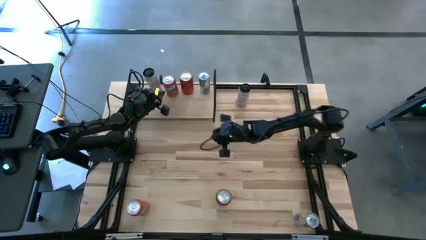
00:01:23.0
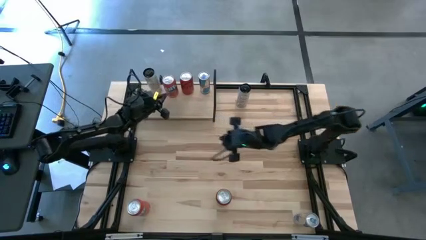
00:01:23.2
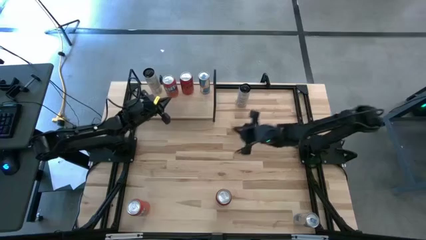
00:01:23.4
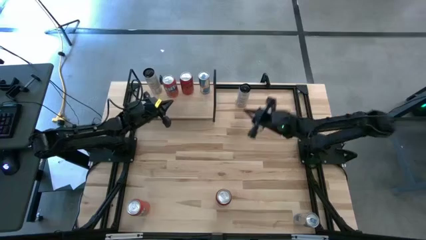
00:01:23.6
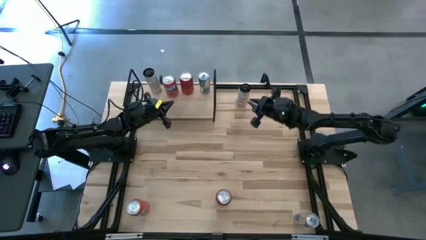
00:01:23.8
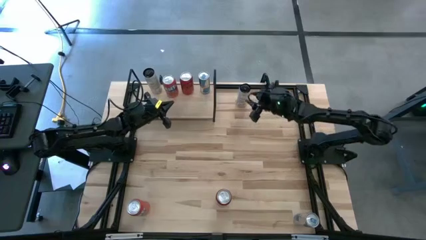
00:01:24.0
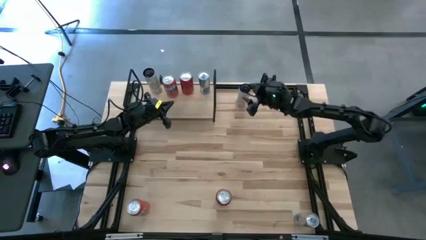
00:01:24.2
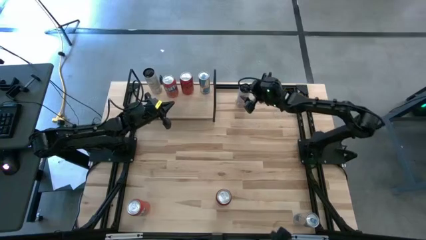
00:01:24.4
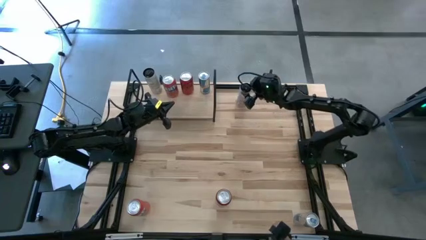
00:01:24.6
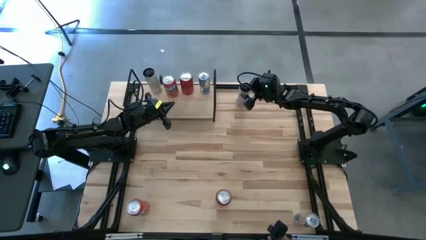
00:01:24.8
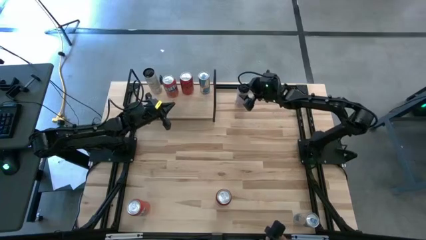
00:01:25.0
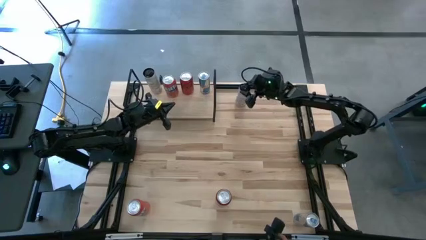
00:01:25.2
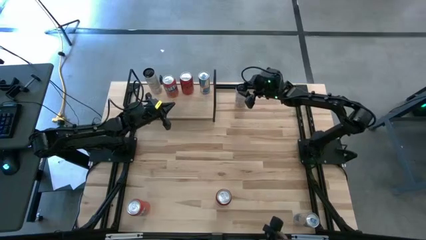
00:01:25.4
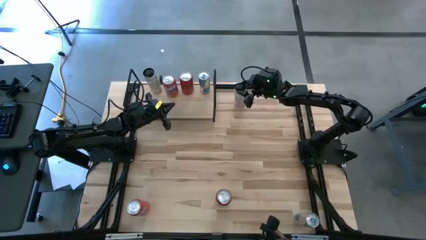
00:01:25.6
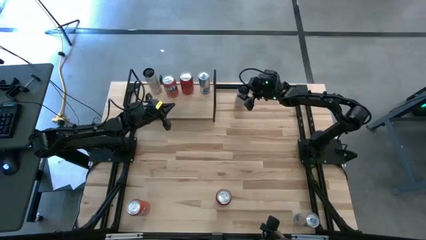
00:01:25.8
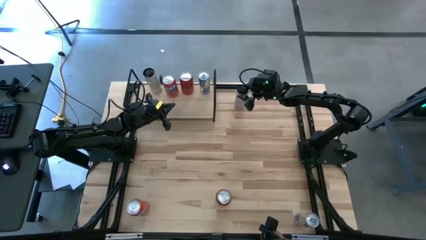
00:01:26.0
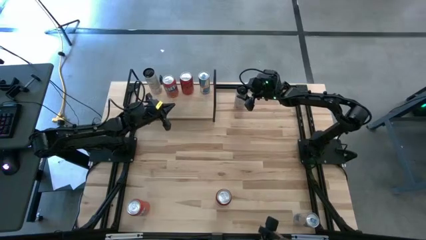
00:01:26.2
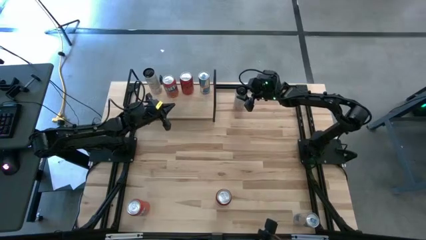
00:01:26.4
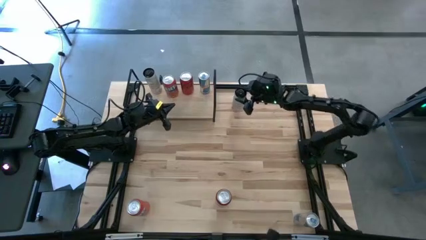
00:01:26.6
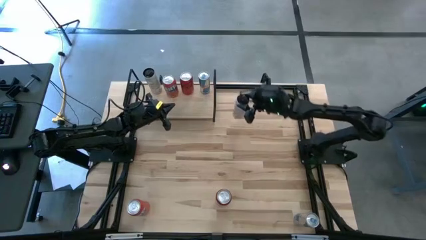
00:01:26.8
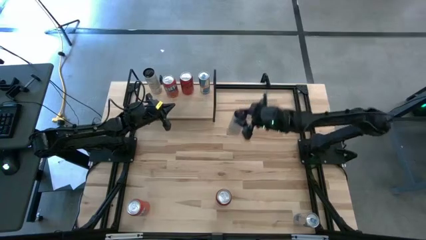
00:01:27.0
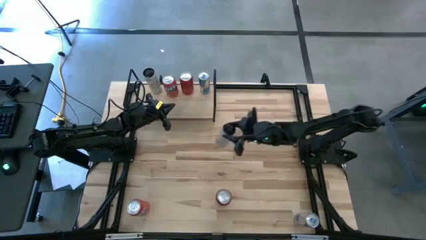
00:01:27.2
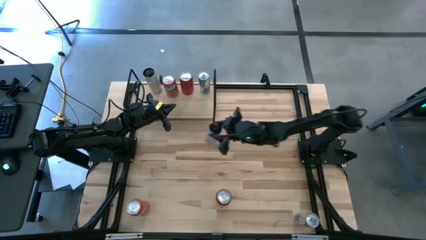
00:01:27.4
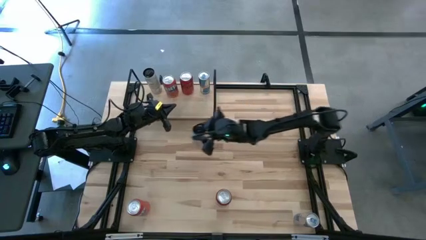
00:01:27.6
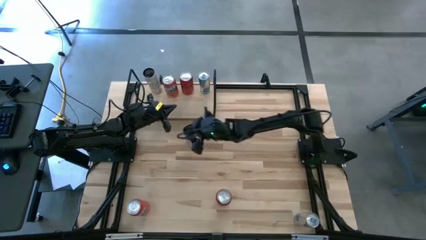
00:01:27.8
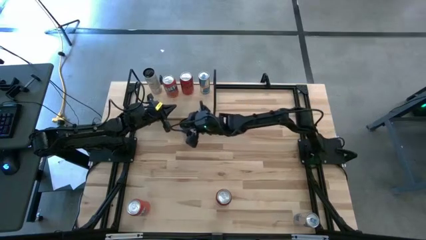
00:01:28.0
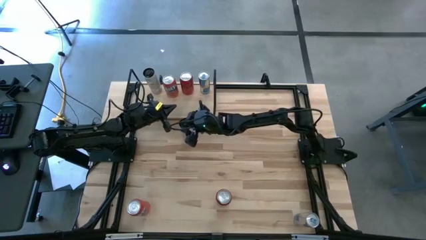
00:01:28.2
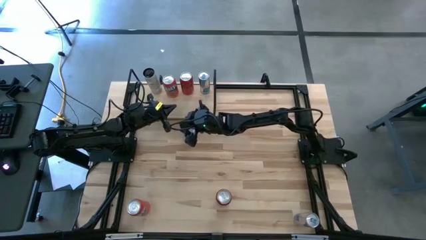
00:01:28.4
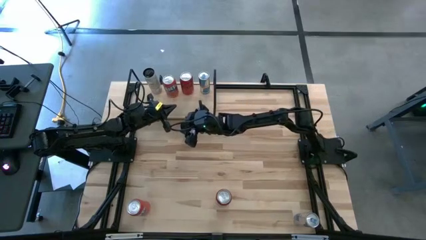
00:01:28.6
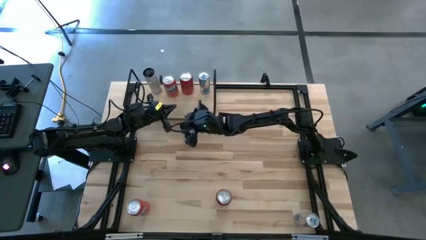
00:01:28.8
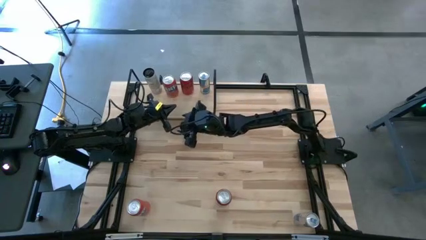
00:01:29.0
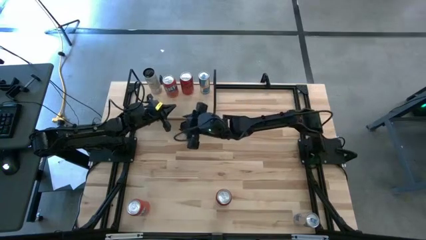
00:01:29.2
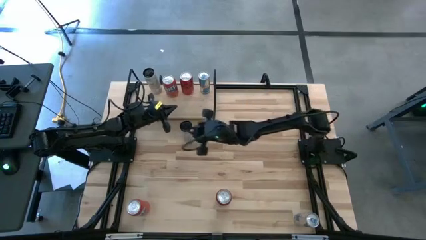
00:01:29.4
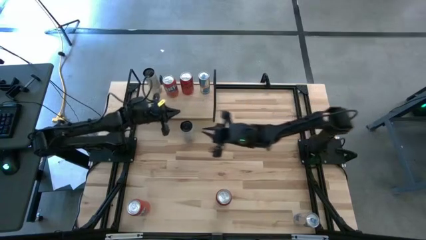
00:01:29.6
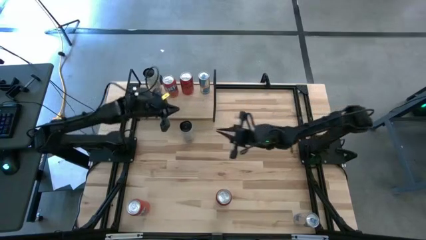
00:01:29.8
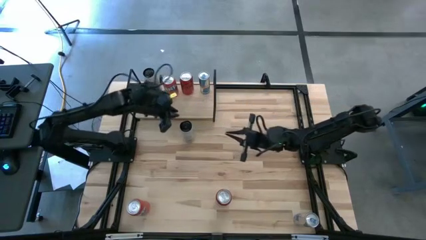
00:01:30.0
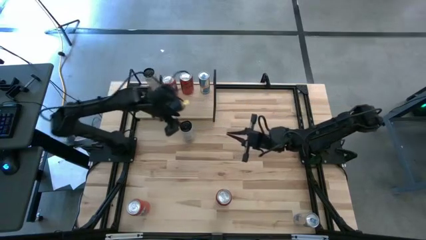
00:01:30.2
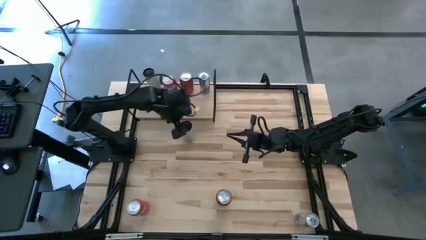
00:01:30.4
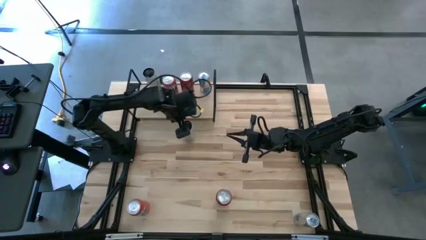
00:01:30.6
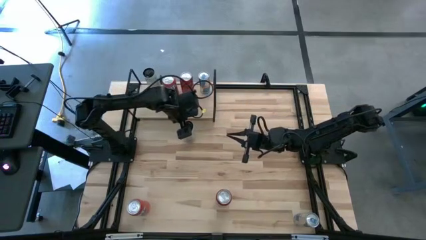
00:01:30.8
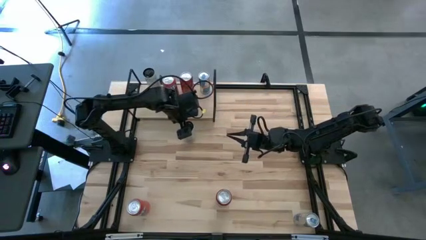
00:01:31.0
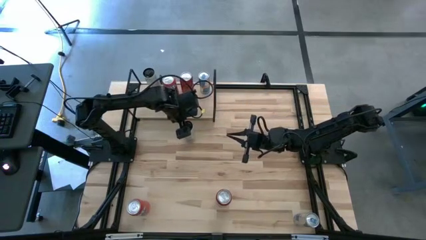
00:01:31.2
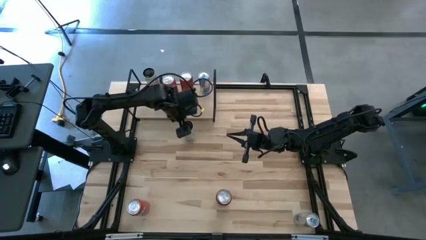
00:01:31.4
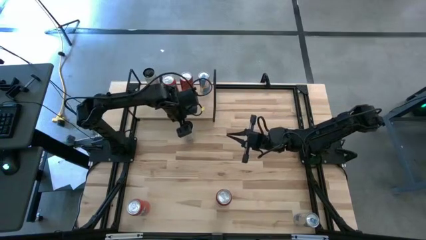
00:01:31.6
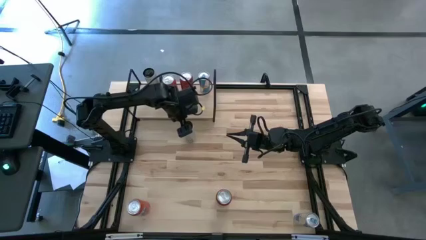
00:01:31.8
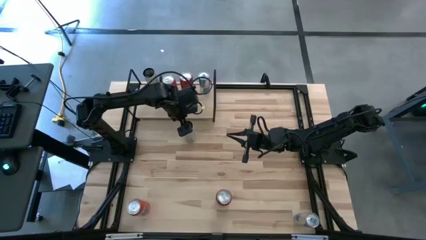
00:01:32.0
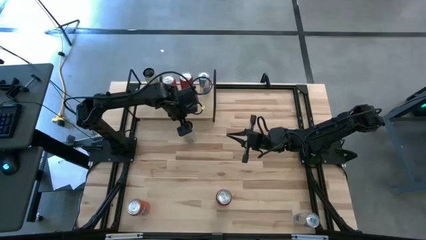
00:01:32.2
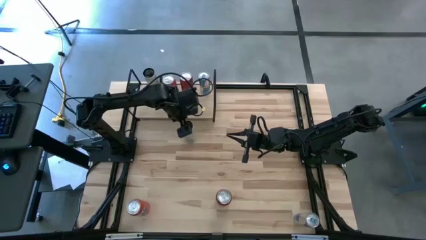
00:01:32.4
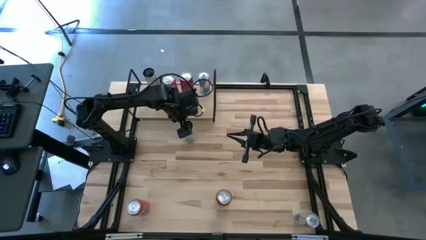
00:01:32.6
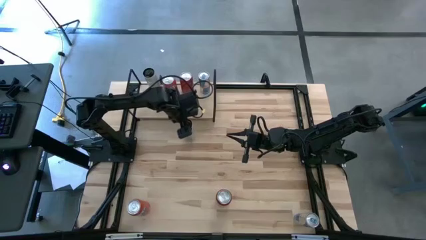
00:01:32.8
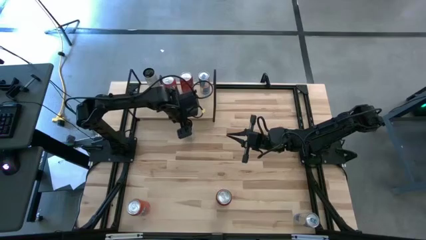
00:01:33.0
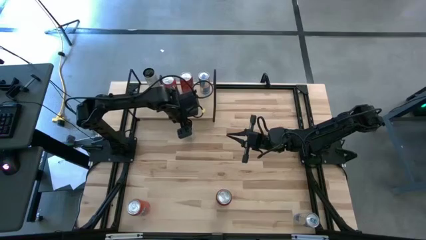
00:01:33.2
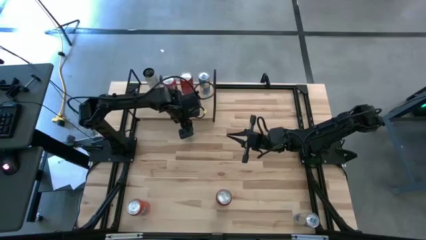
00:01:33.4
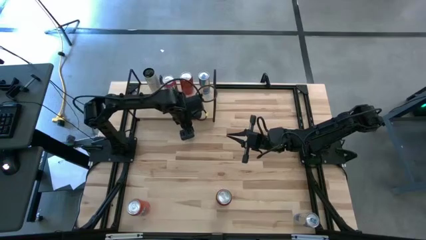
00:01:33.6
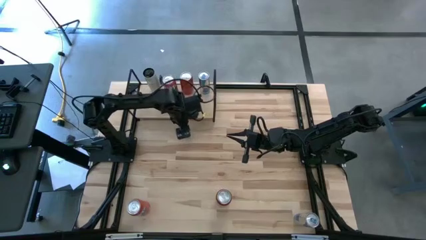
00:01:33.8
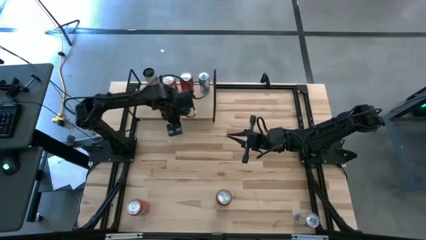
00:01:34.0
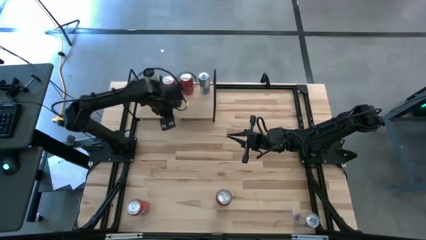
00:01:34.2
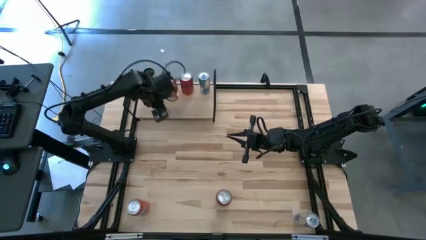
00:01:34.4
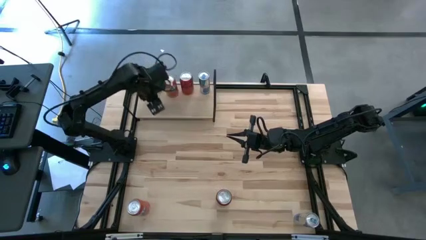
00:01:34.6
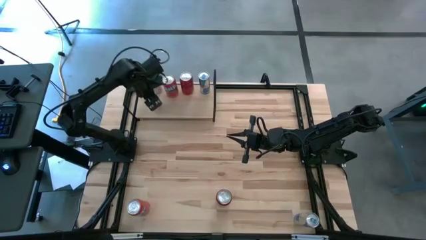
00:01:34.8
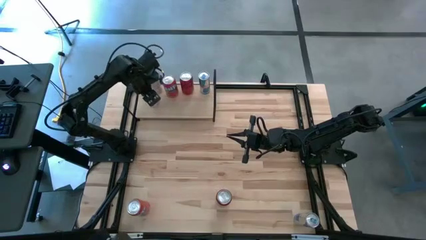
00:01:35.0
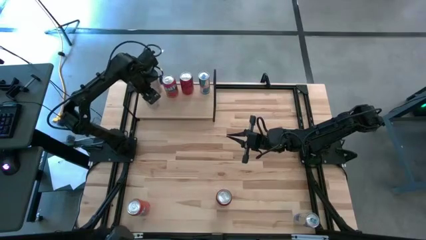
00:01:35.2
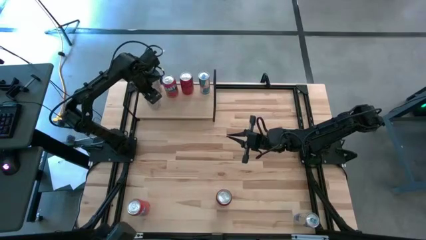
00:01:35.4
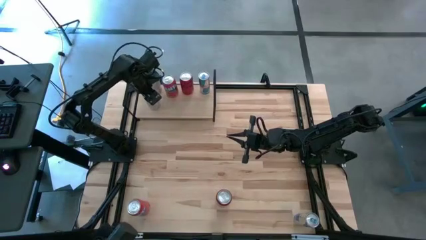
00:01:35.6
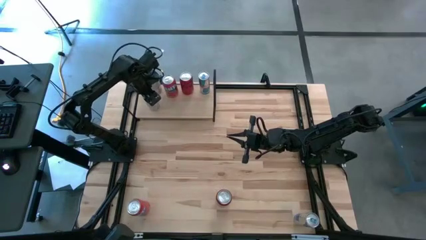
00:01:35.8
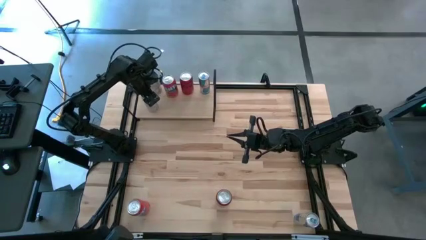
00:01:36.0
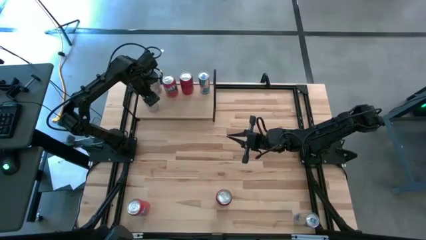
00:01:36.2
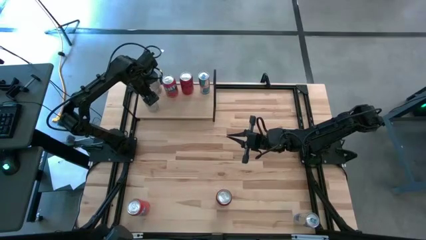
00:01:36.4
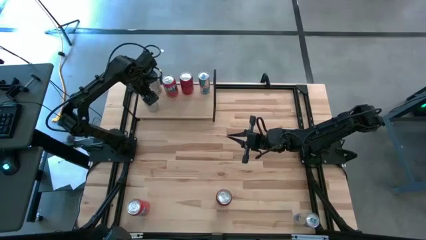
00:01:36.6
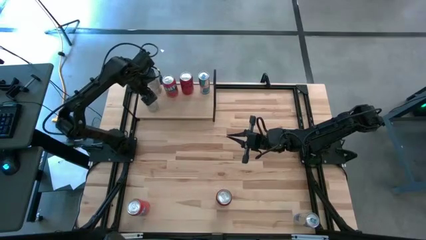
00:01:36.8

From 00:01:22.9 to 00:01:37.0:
Task: Place canned beverage on shelf
Put the white and yellow soda can aligned with the other white and yellow soda can on the shelf
